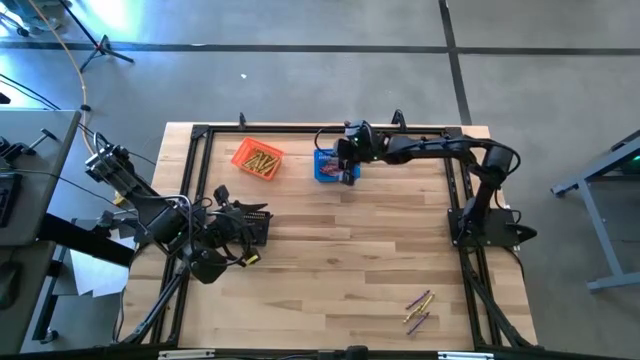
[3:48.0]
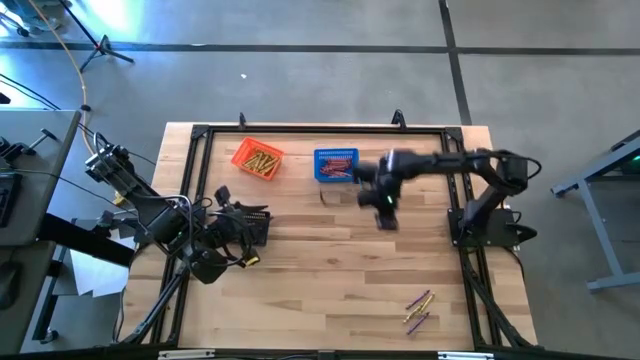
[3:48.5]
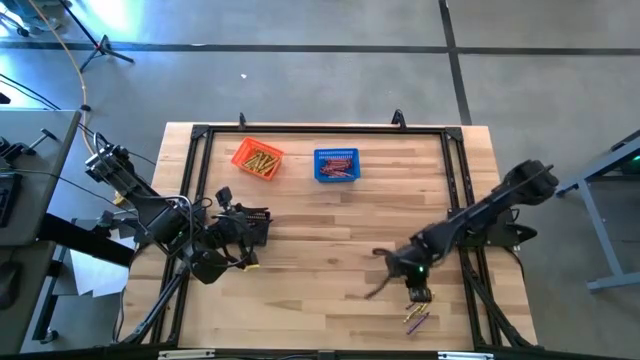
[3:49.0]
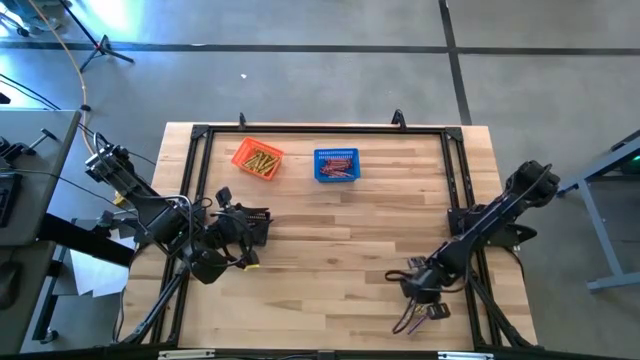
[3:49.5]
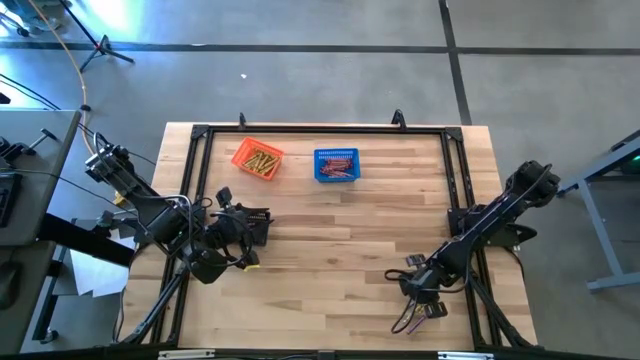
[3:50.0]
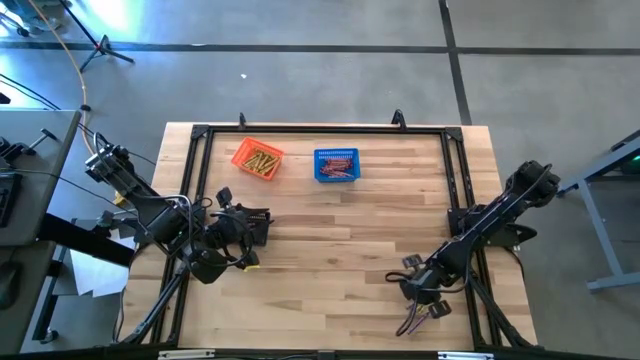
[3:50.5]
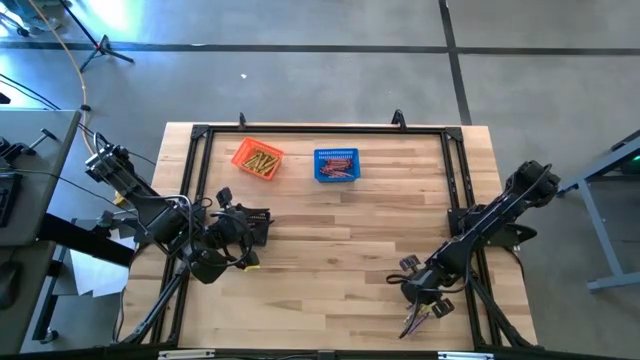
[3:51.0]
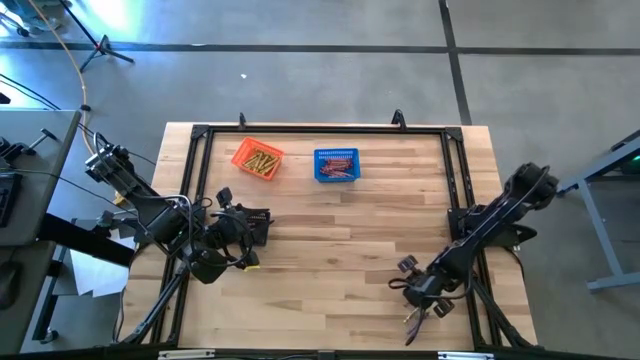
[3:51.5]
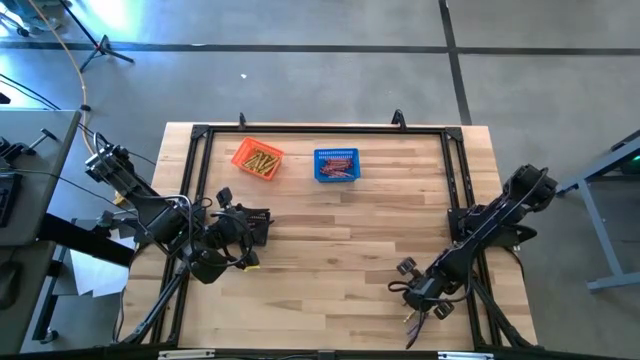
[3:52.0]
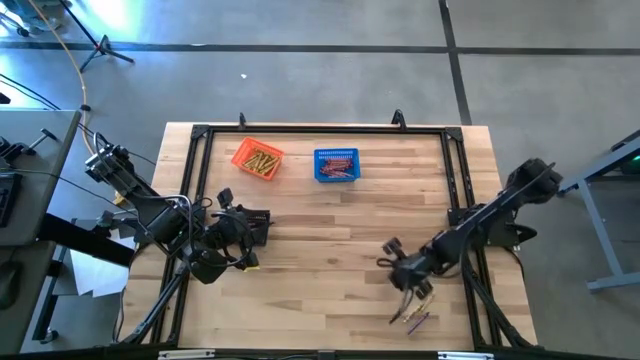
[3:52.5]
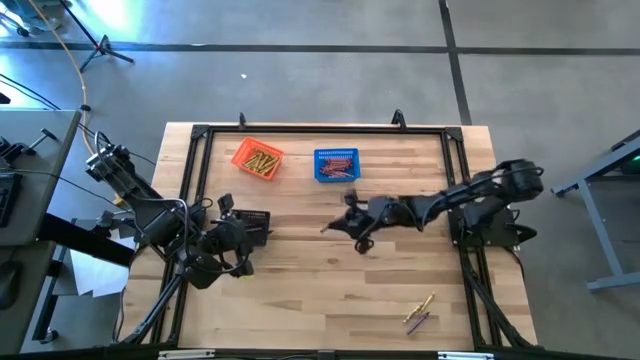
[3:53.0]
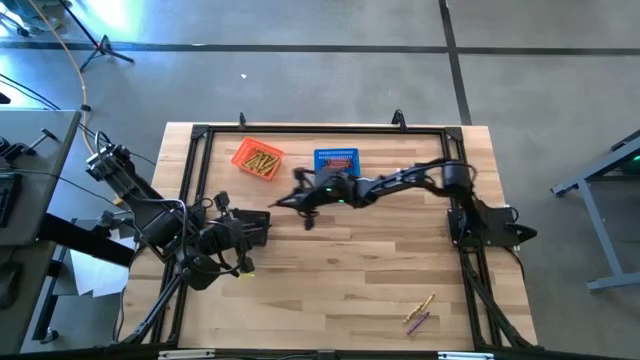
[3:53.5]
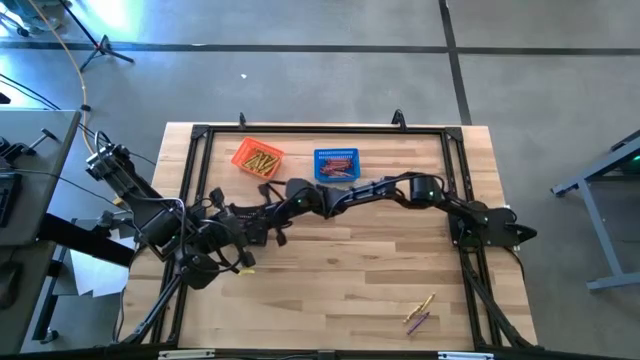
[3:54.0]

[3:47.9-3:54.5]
Task: Sort crayons
Put the violet crayon into the black bin

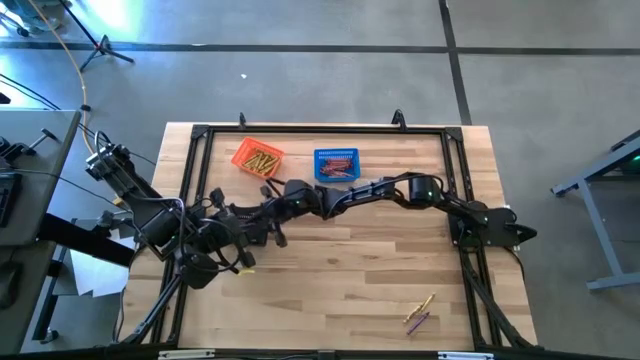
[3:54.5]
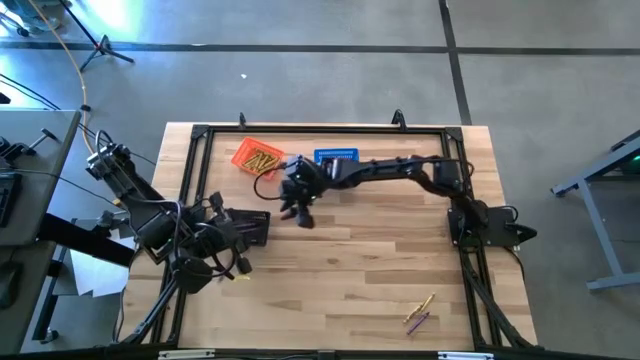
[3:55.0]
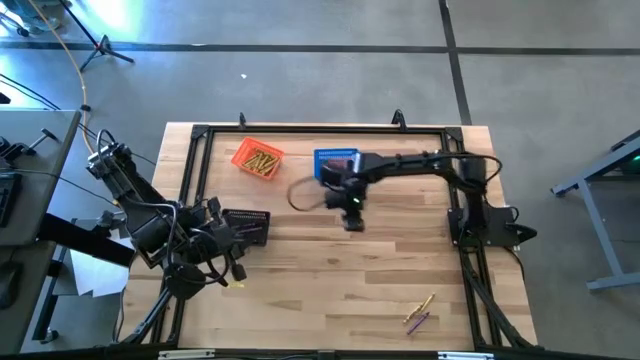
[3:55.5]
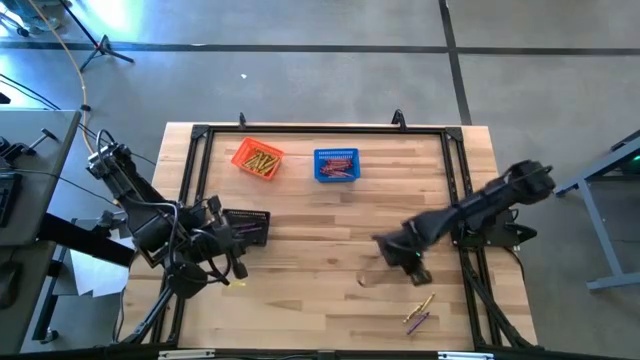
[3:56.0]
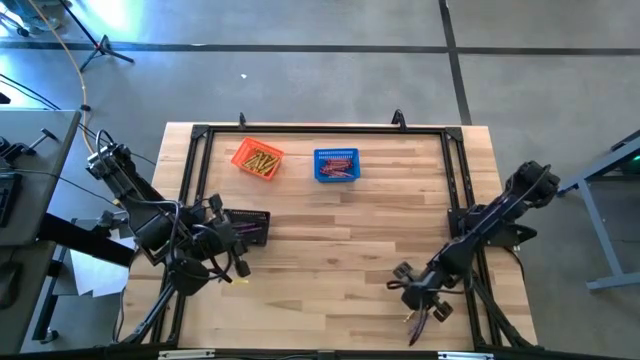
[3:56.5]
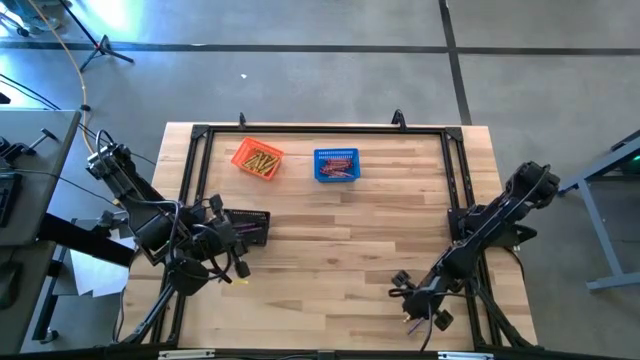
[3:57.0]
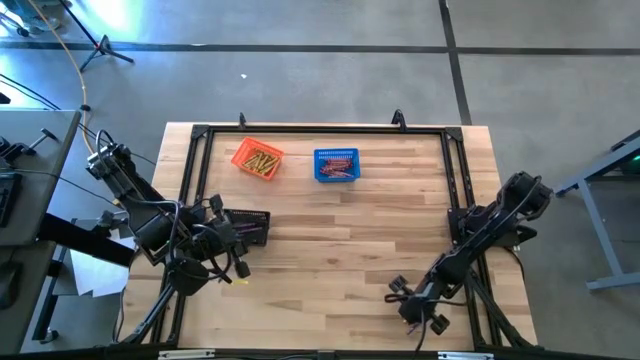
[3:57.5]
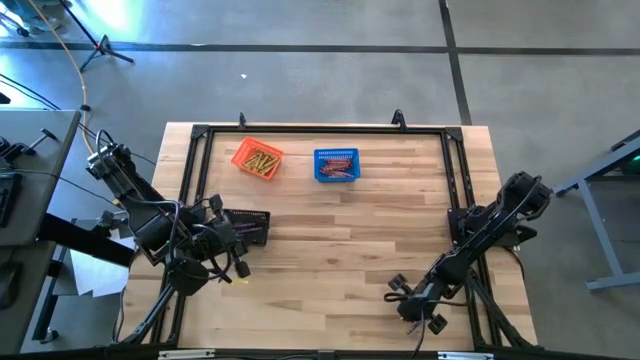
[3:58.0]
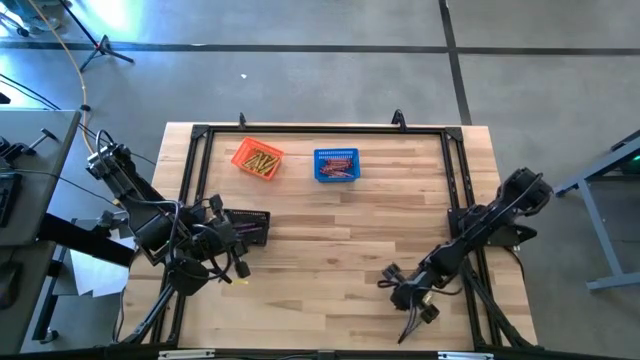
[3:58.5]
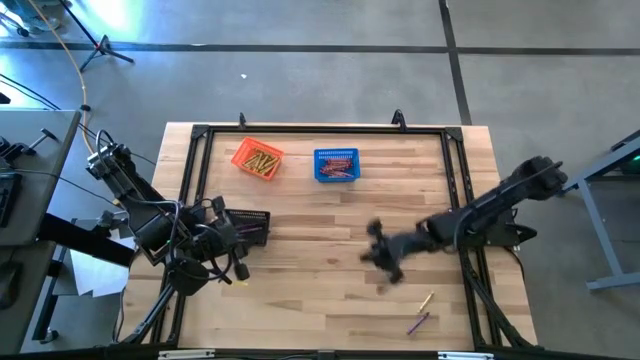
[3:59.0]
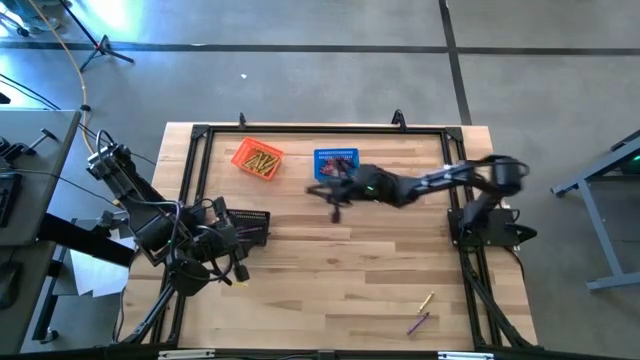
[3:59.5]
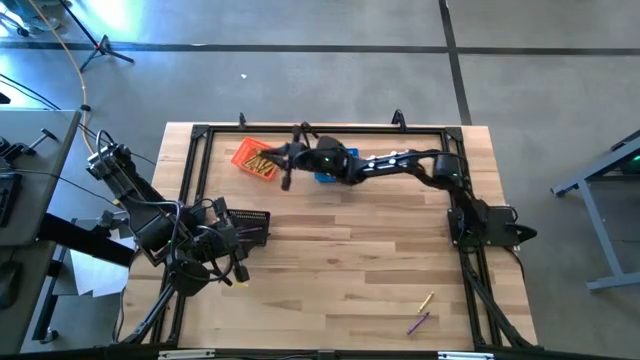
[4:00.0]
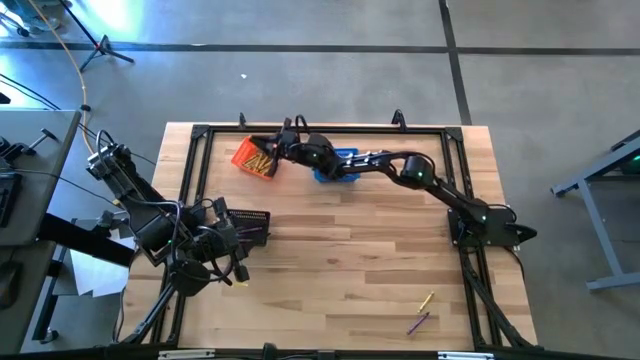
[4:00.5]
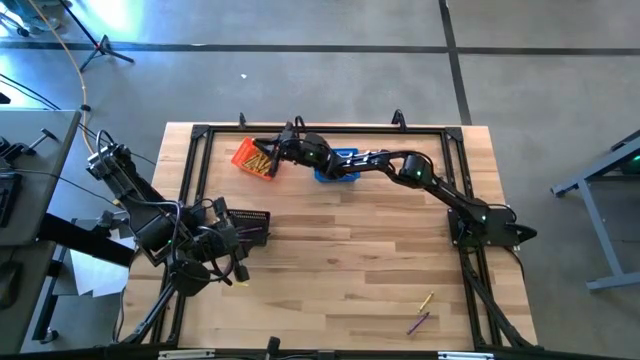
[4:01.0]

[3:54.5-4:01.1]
Put the yellow crayon into the orange bin

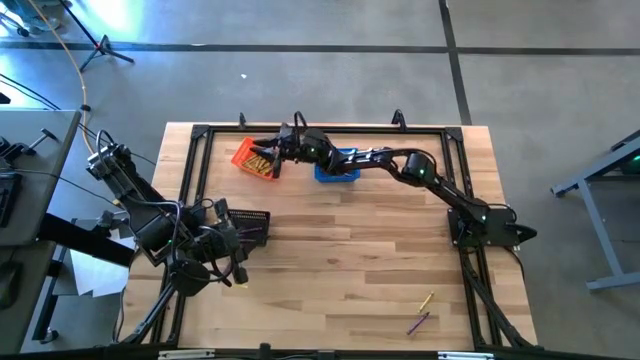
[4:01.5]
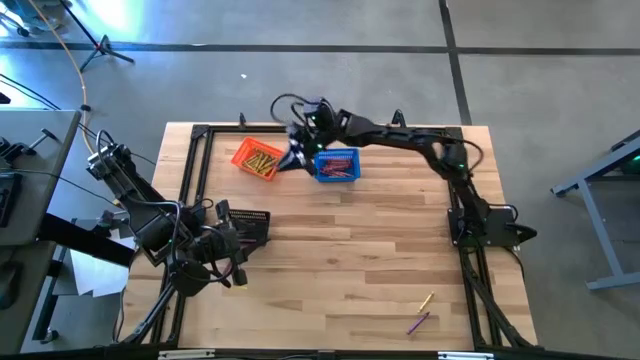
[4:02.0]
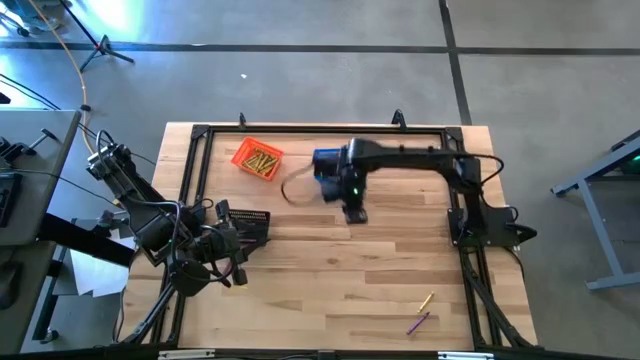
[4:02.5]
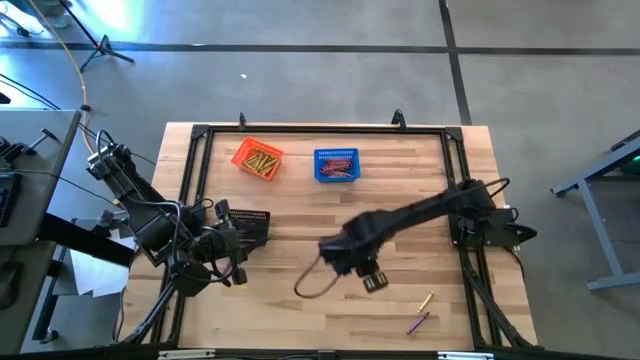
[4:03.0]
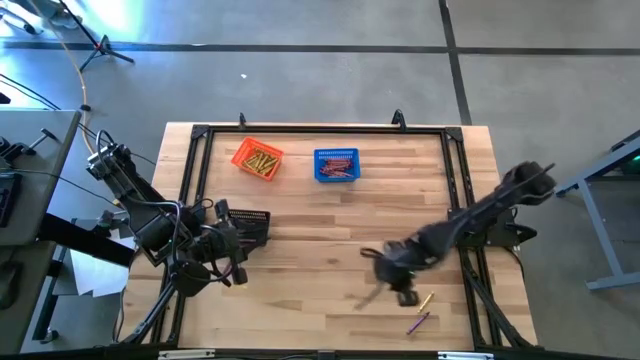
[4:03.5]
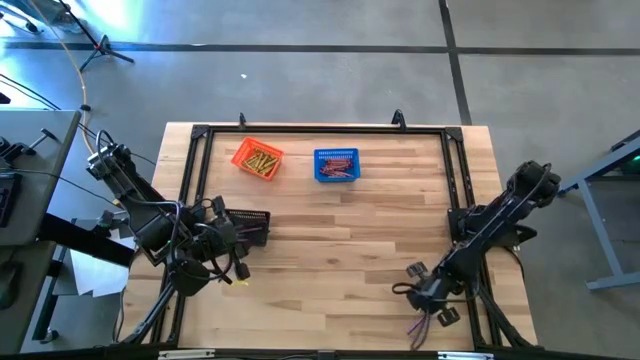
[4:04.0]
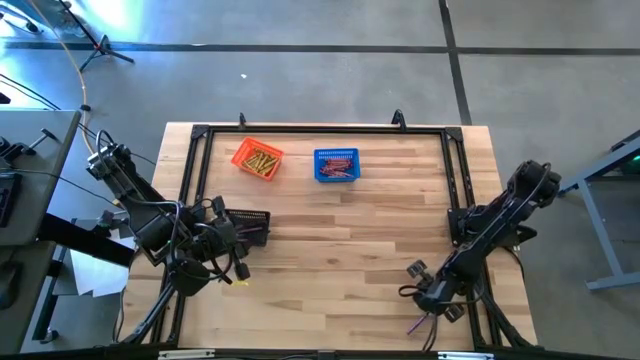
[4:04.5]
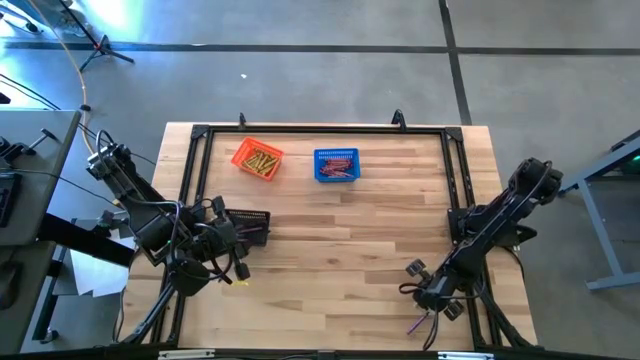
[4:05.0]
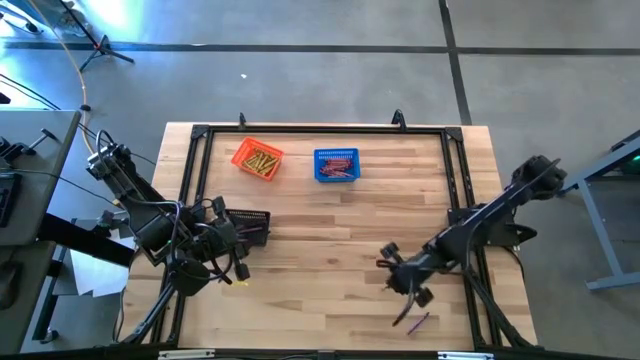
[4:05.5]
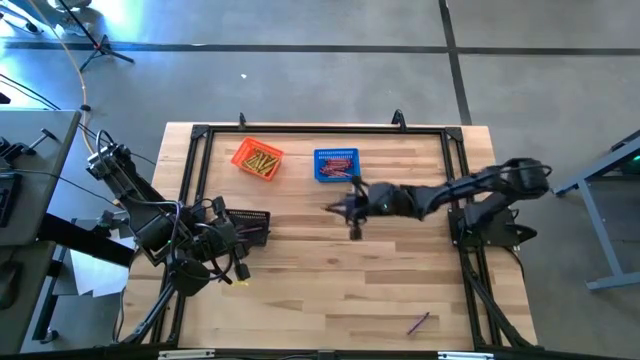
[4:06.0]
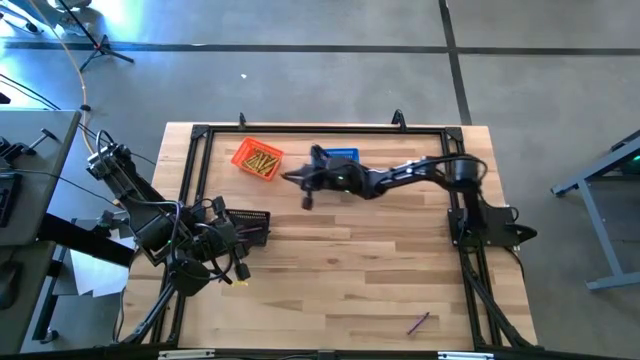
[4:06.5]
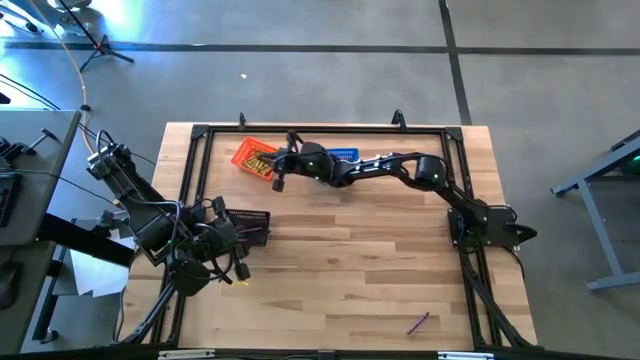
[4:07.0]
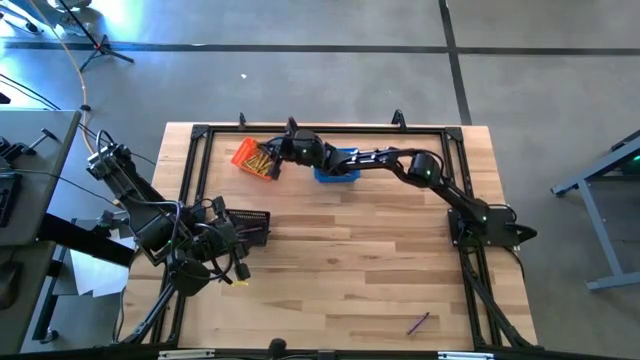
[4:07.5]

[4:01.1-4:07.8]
Put the yellow crayon into the orange bin

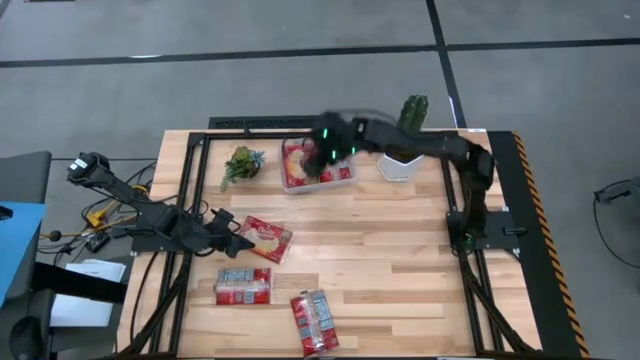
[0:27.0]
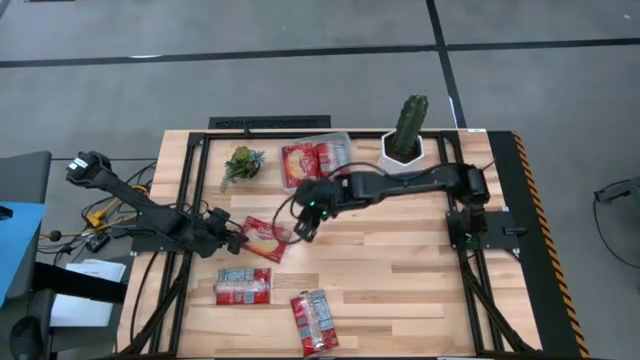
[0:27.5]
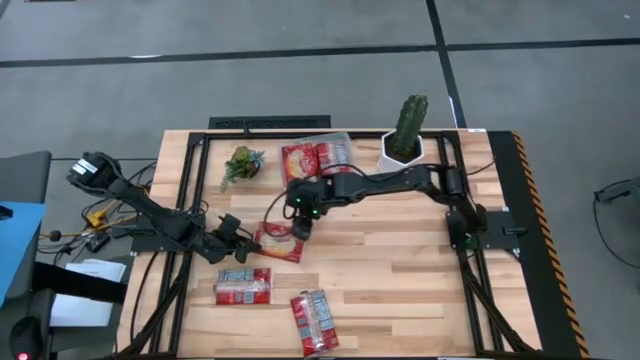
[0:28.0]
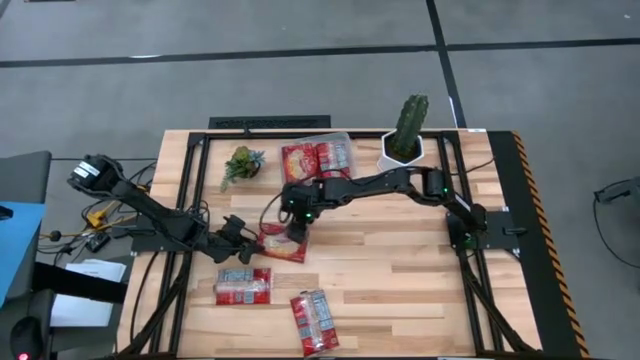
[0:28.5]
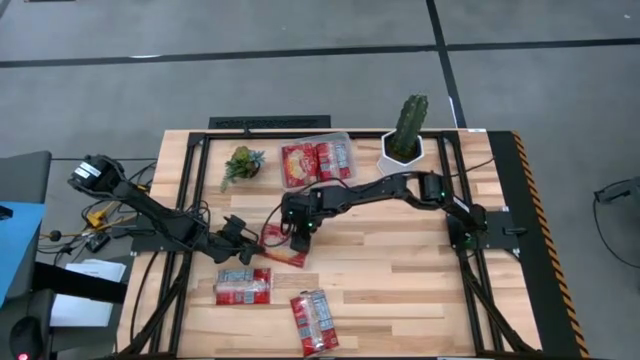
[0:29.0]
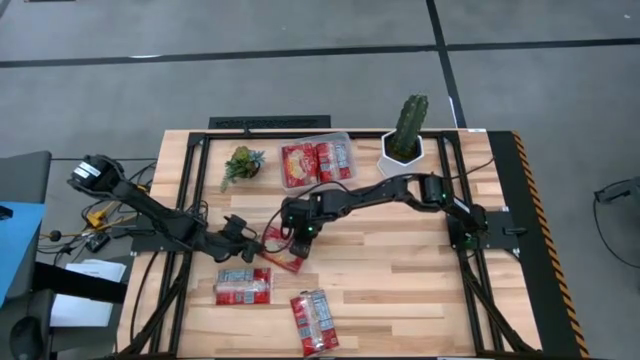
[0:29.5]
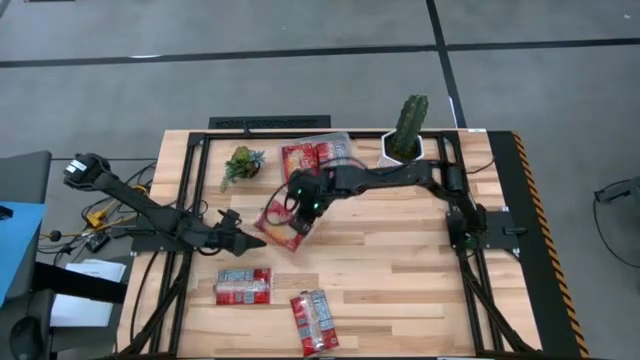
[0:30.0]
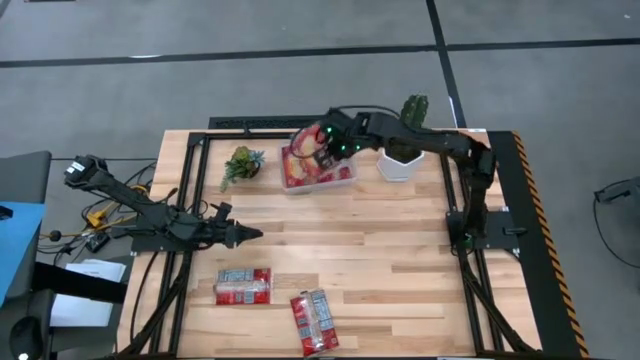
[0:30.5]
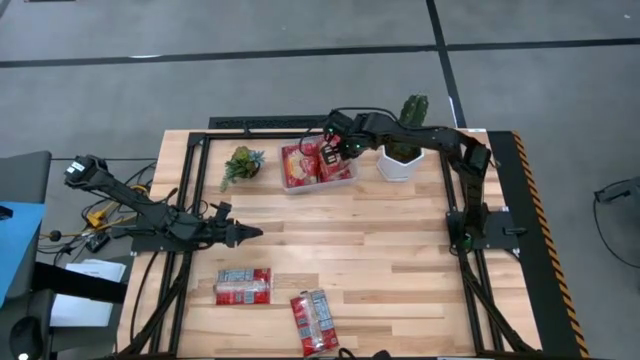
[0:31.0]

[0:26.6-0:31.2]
Task: Sort popcorn bags into baskets
Put the red popcorn bag into the transparent bin
